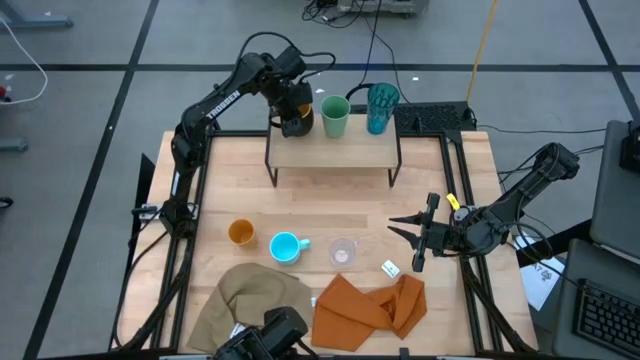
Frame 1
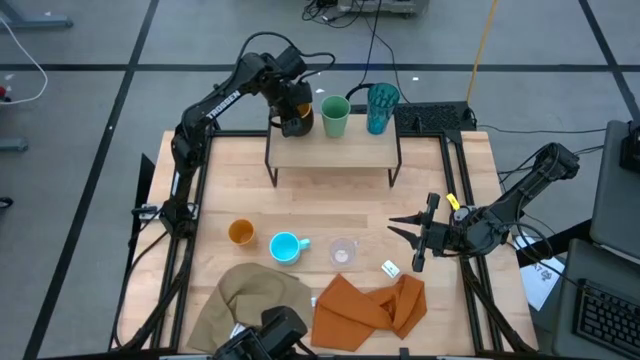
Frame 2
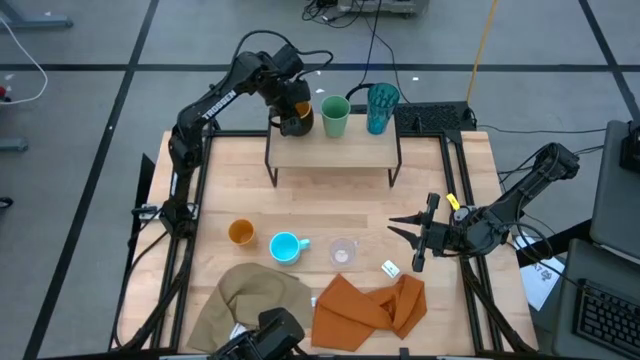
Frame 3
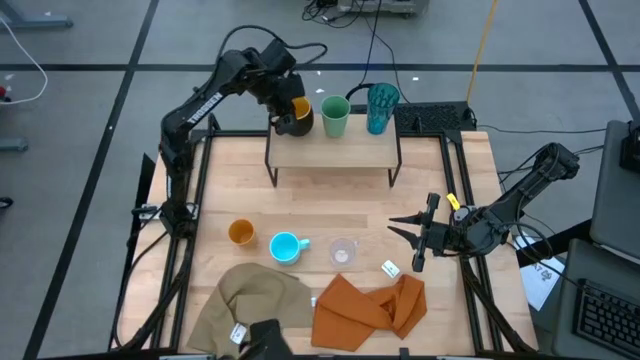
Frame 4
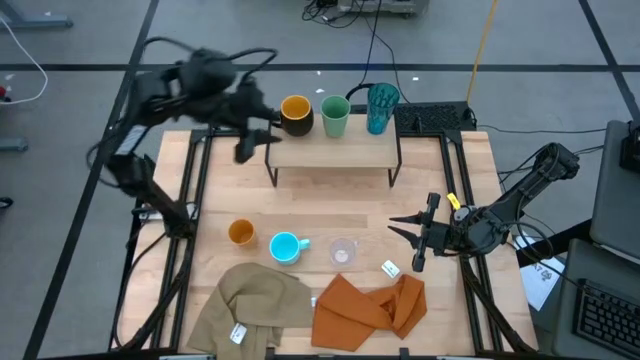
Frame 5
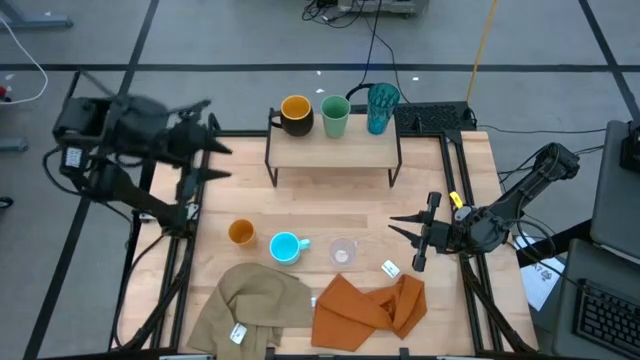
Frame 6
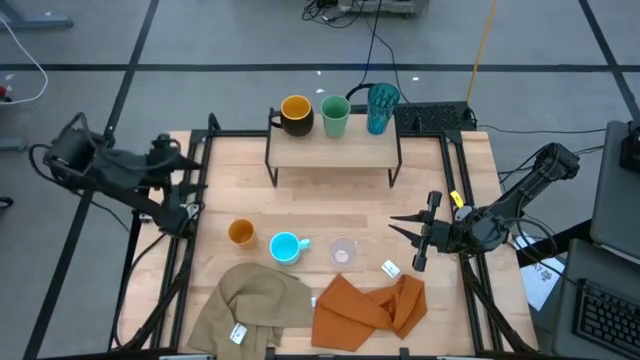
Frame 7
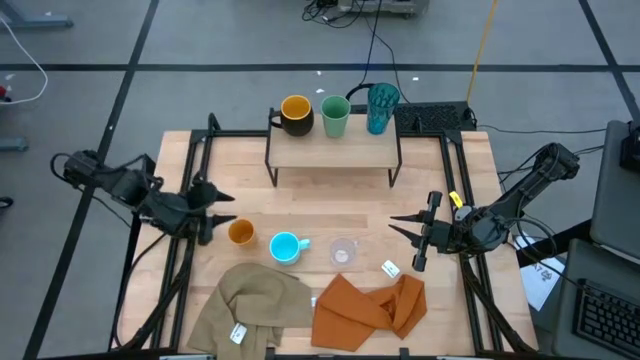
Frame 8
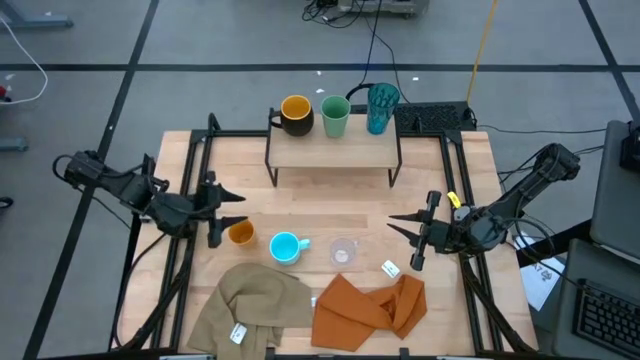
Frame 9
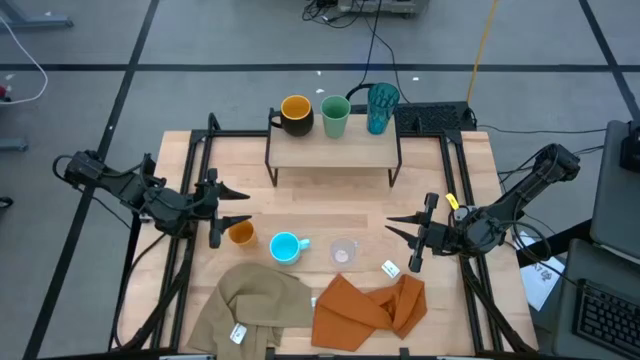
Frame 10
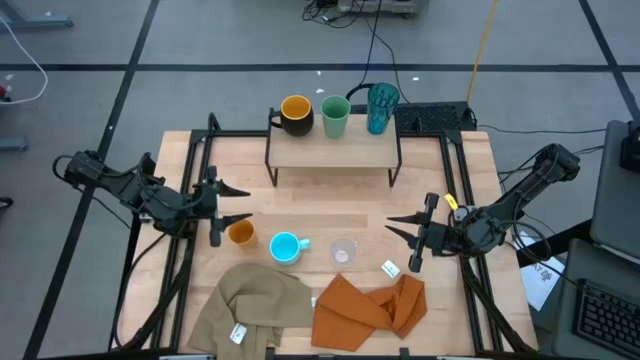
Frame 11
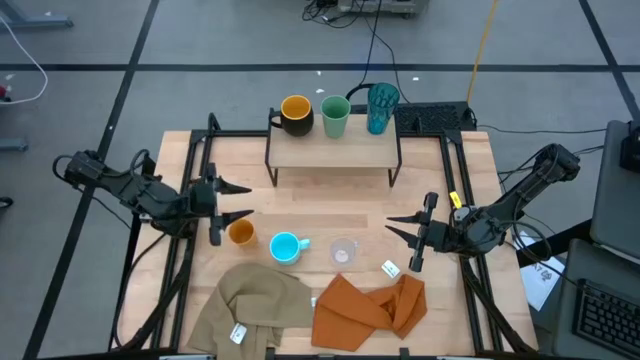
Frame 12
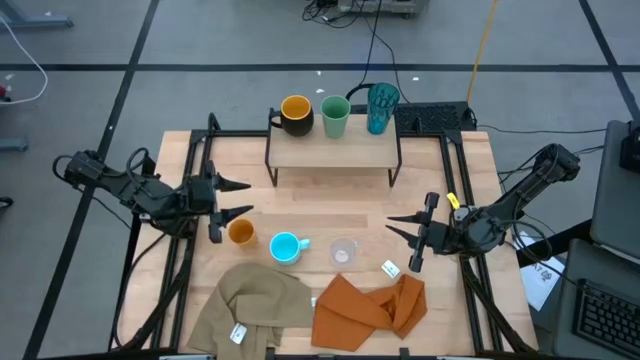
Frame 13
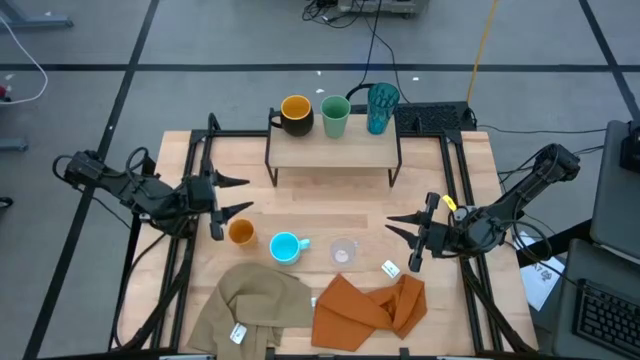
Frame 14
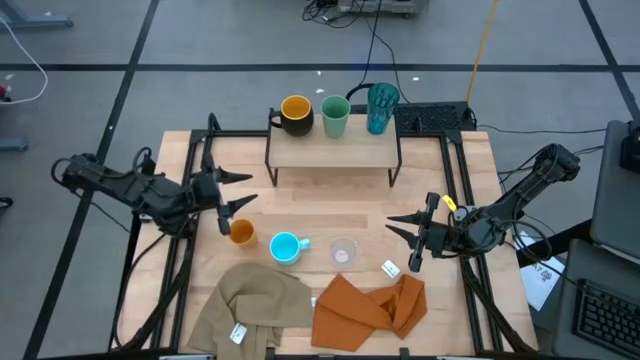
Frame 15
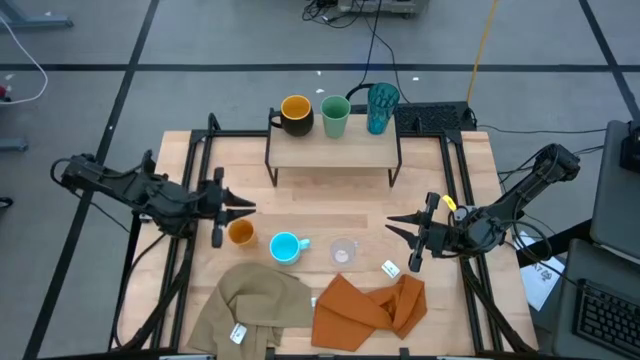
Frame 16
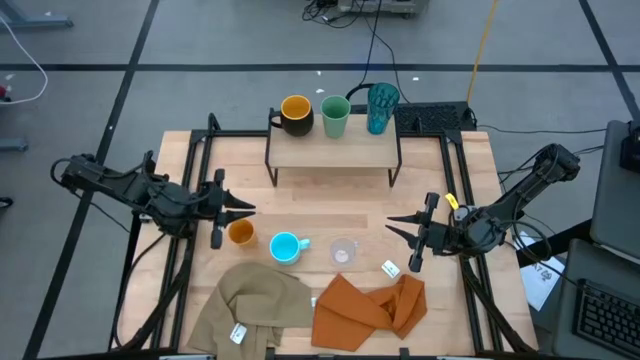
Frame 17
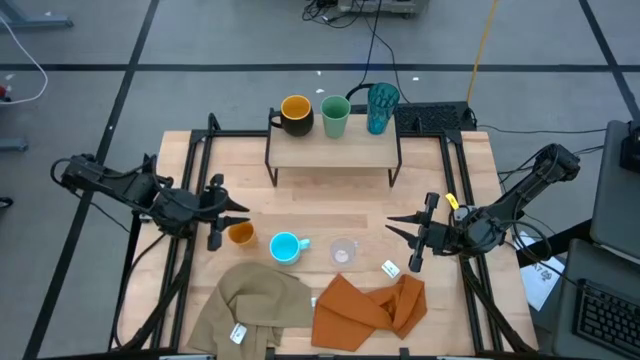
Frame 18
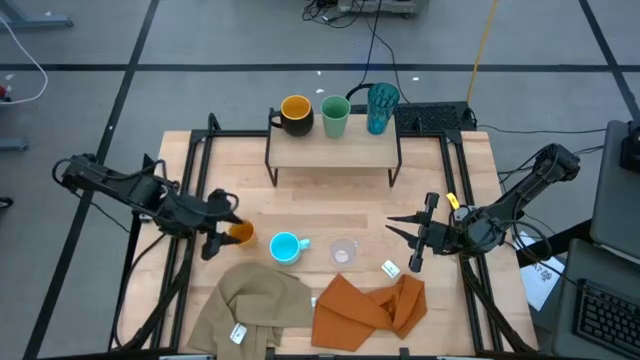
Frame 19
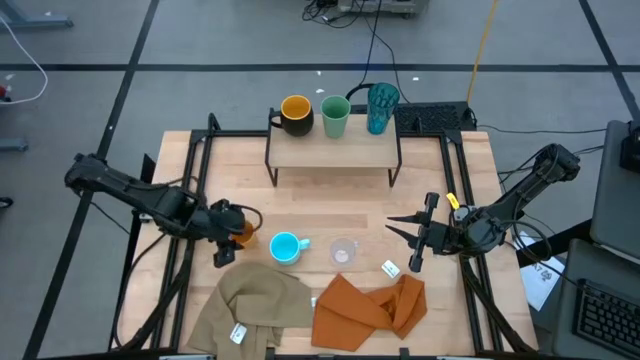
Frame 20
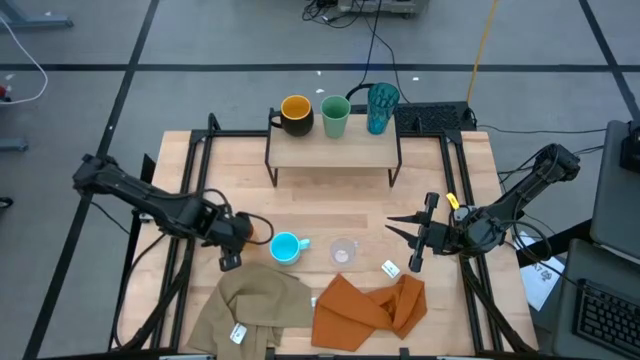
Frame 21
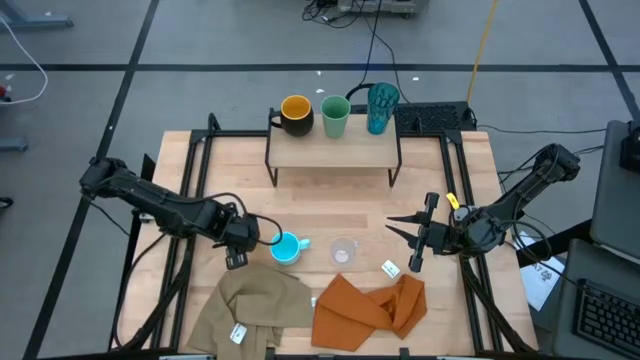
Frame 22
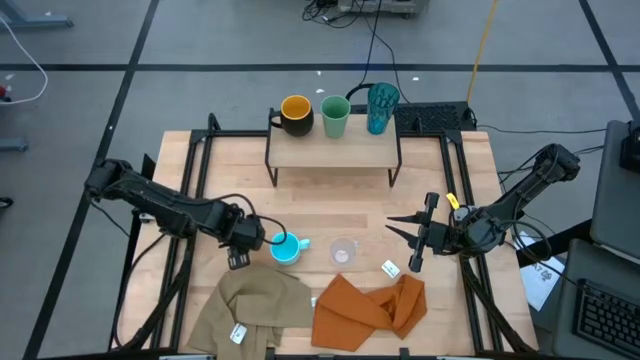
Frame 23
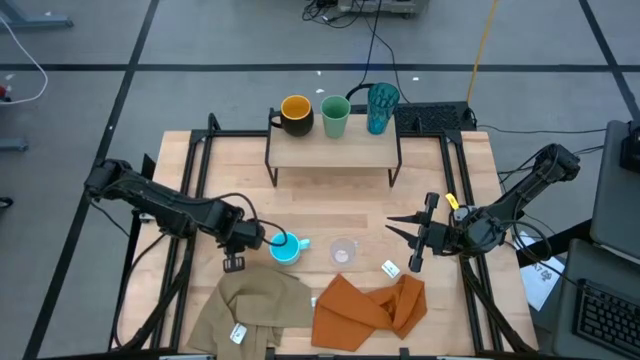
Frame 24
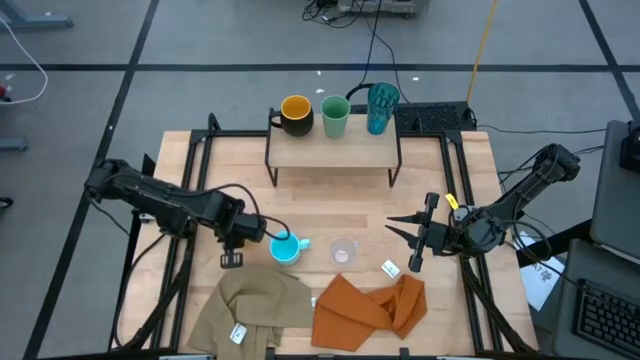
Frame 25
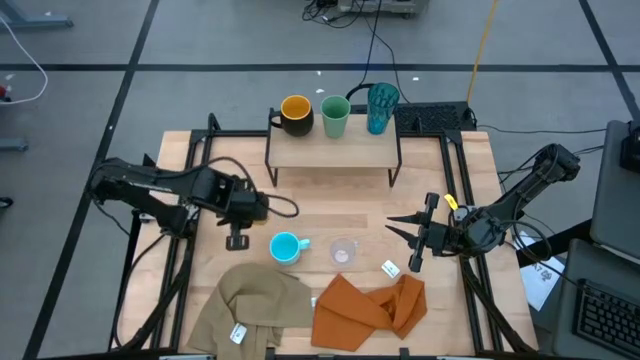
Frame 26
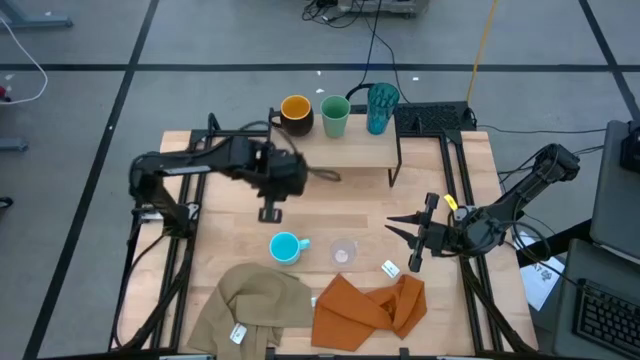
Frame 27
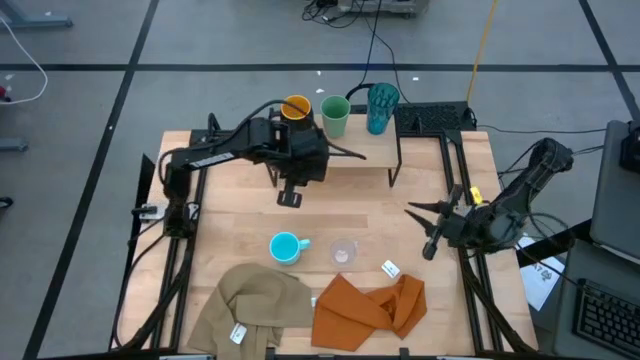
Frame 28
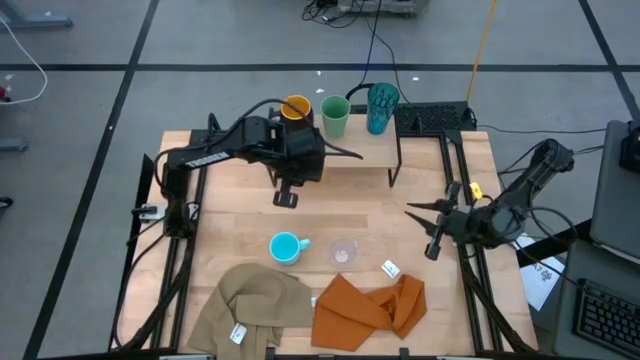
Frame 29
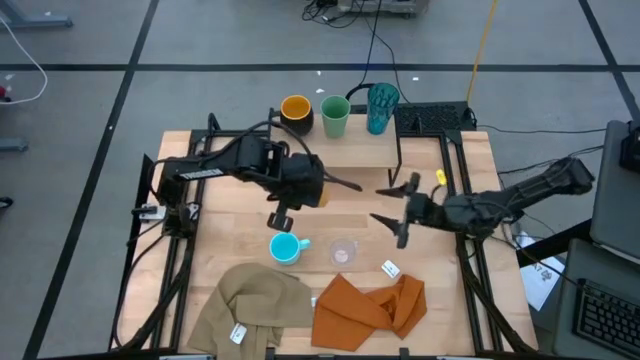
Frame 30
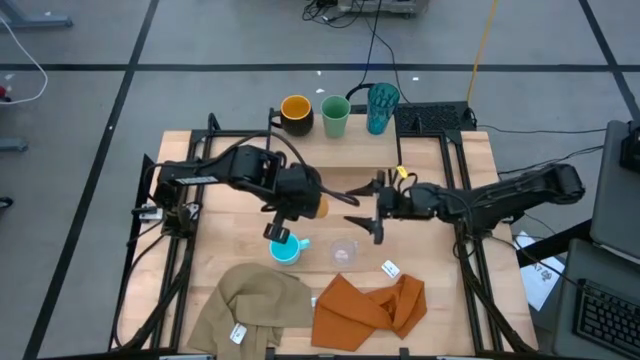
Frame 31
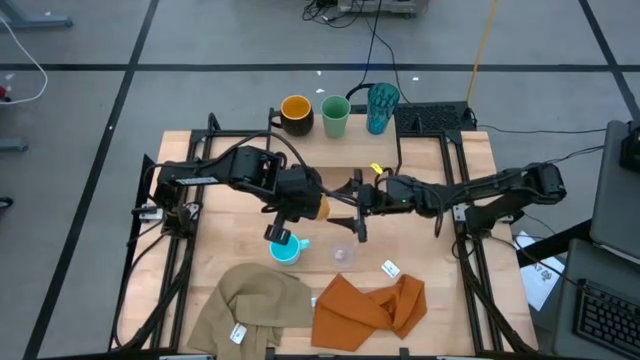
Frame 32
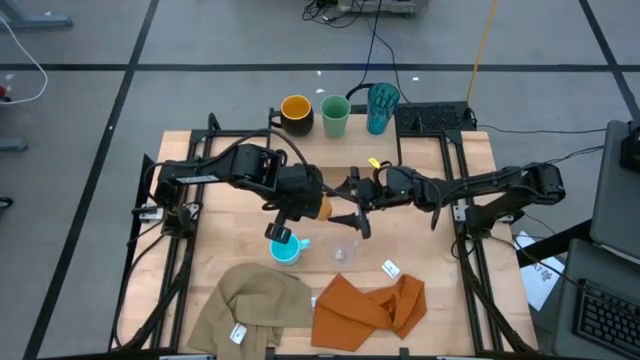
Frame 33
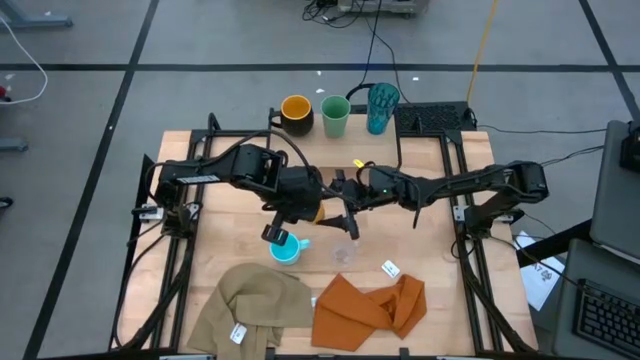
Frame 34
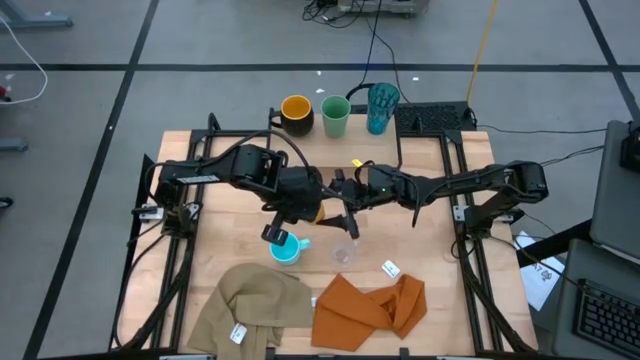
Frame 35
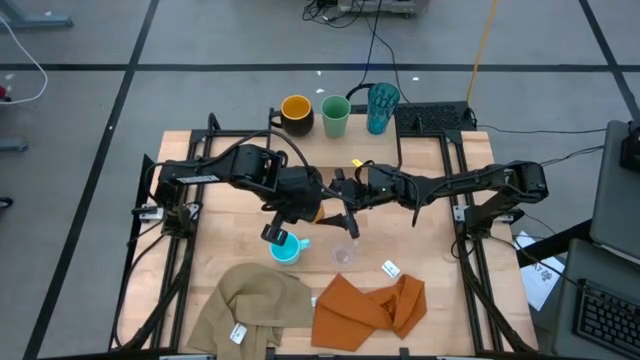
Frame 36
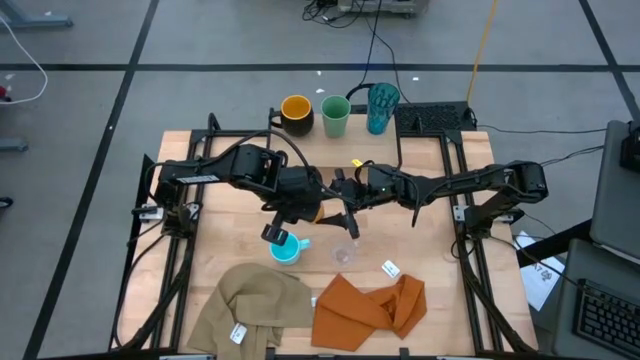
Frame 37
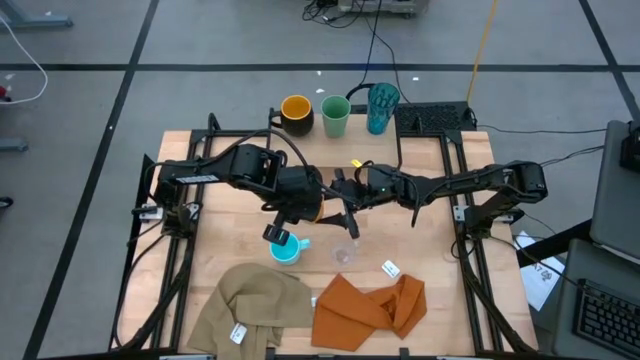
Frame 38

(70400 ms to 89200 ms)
Task: Stack small to large cups/mugs on shelf
Put the orange cup on the shelf

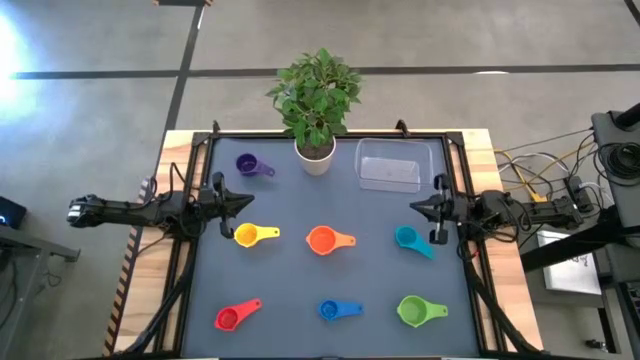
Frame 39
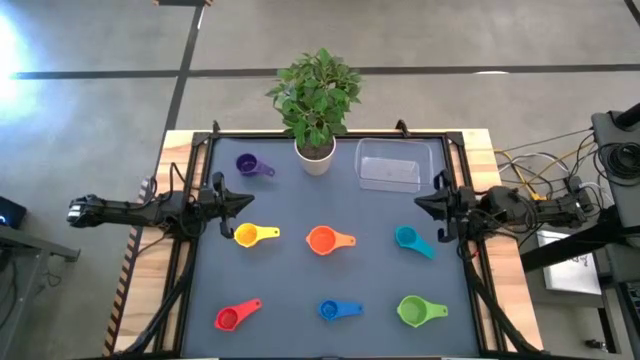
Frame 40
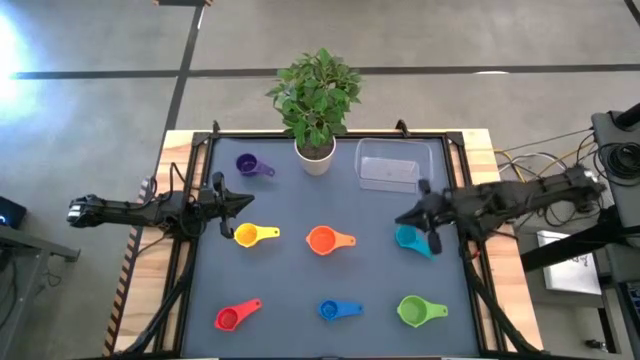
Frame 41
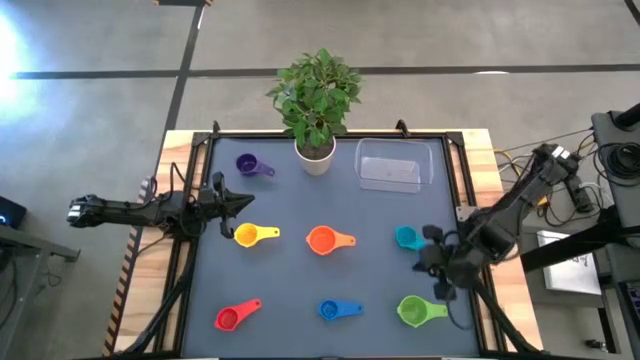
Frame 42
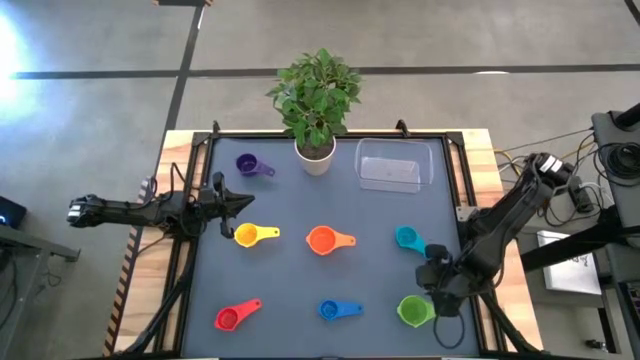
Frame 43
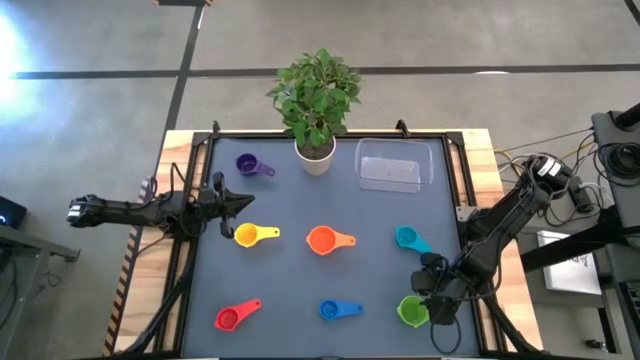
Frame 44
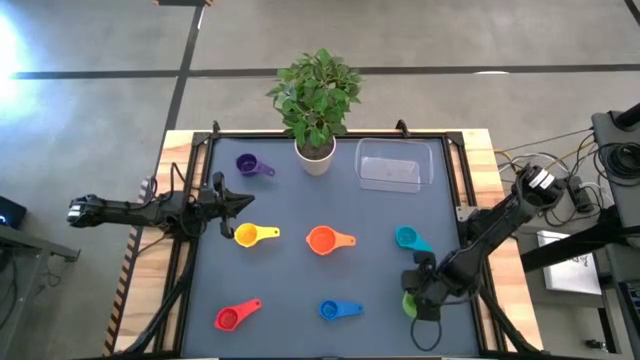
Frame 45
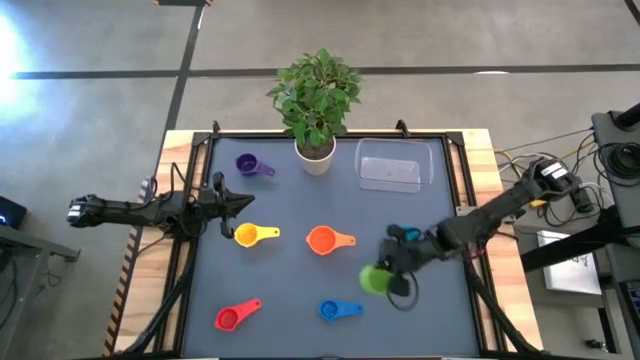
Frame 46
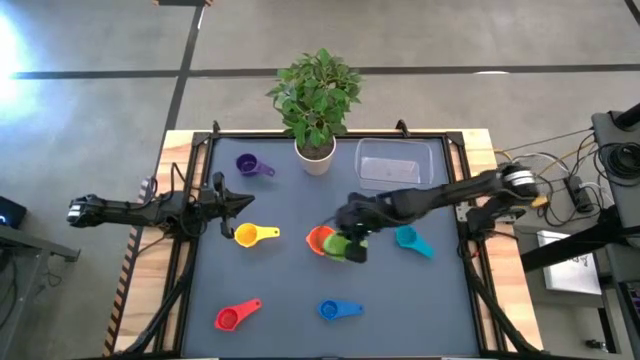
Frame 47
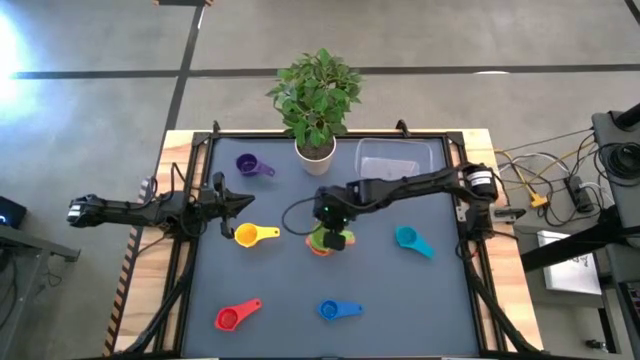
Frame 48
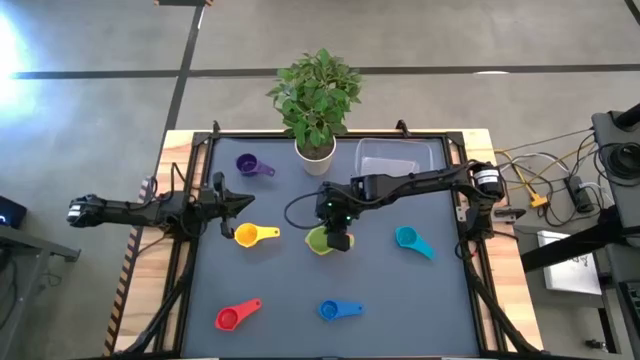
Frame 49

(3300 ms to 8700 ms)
Task: Nest measuring cups in basket
Stack the green measuring cup on top of the orange measuring cup
